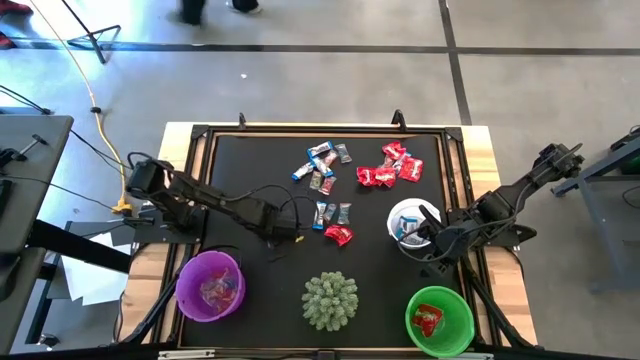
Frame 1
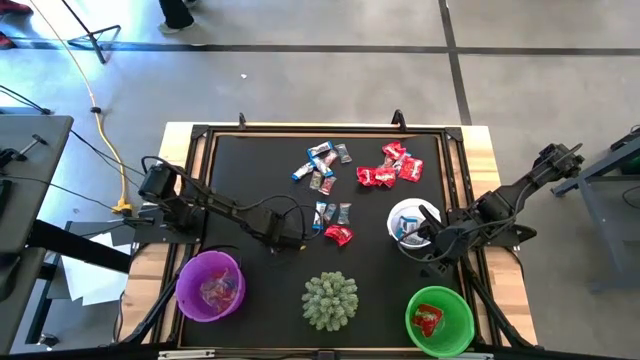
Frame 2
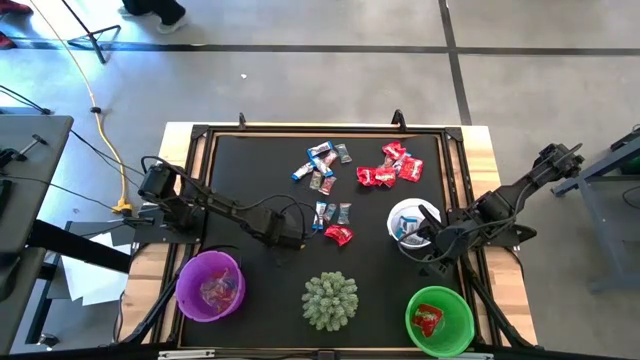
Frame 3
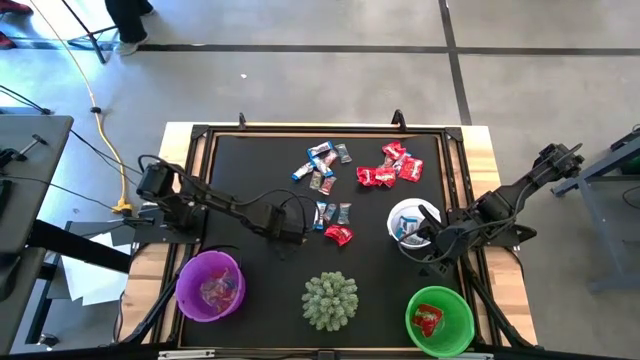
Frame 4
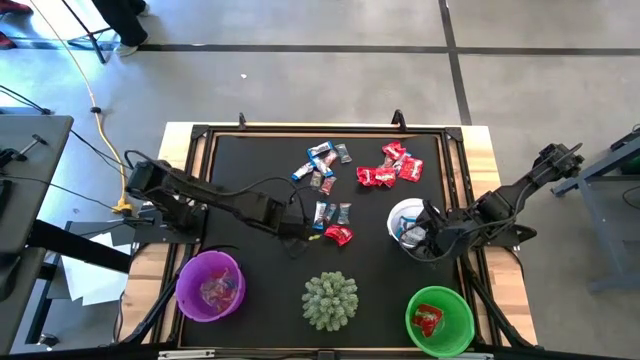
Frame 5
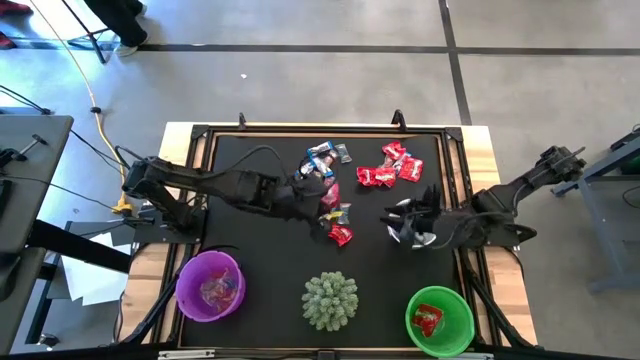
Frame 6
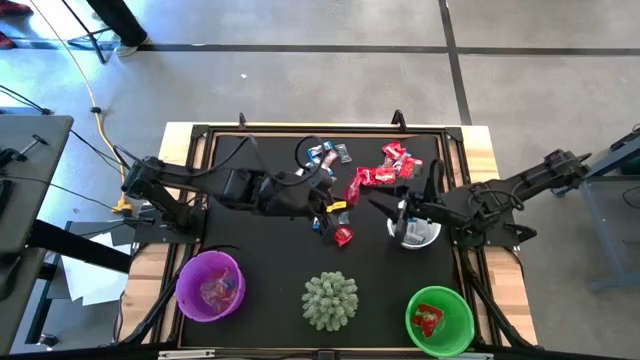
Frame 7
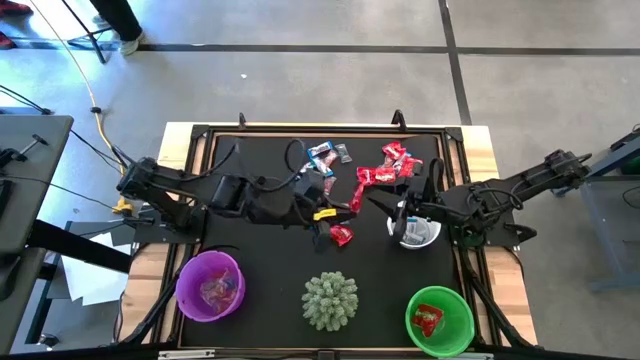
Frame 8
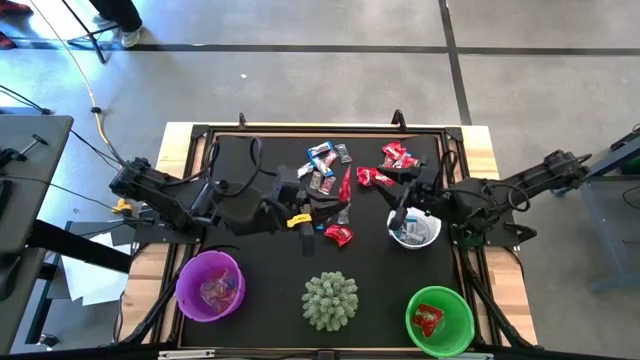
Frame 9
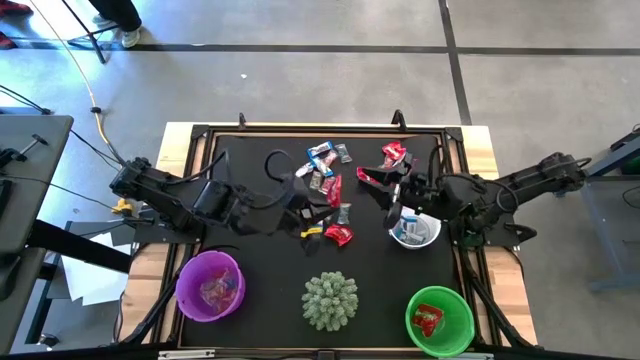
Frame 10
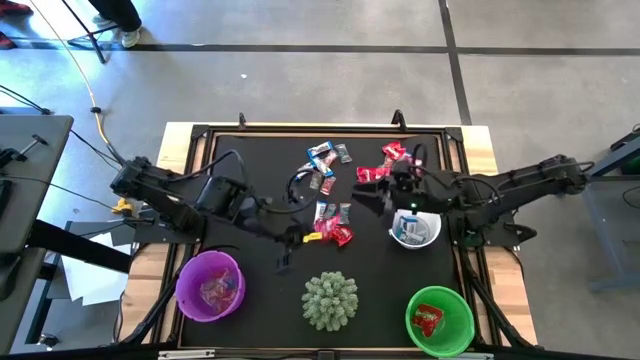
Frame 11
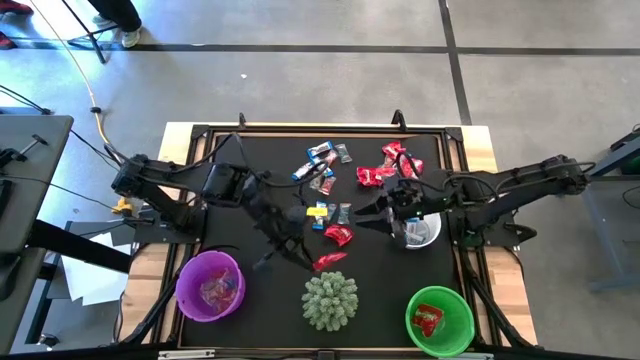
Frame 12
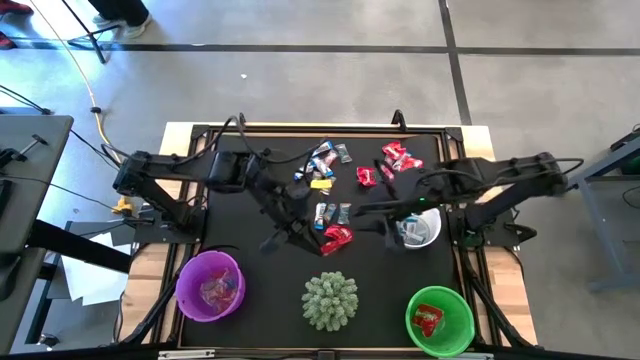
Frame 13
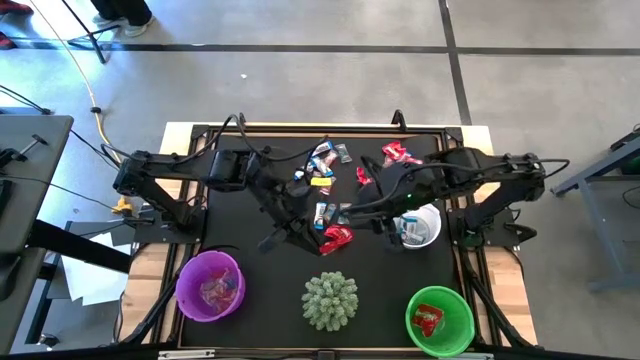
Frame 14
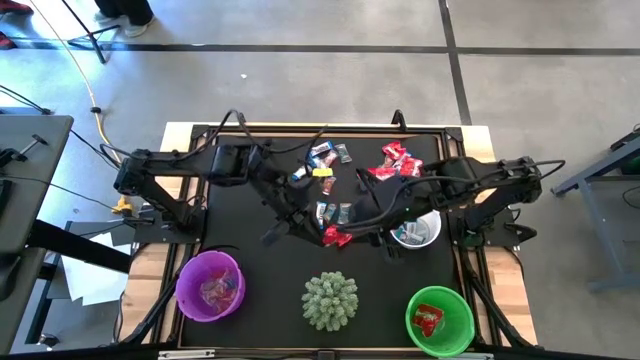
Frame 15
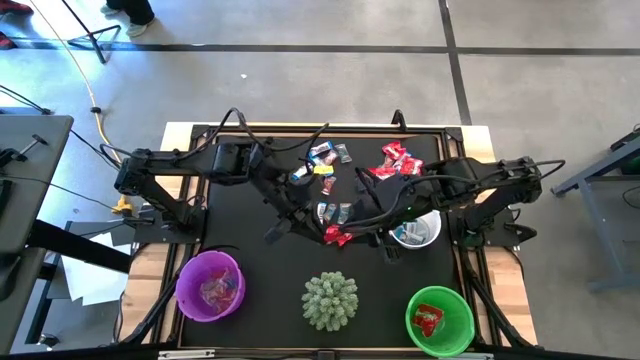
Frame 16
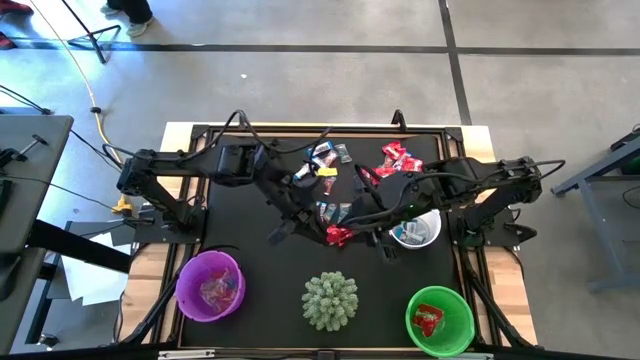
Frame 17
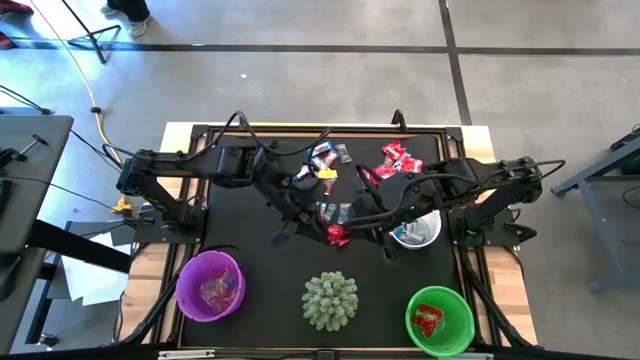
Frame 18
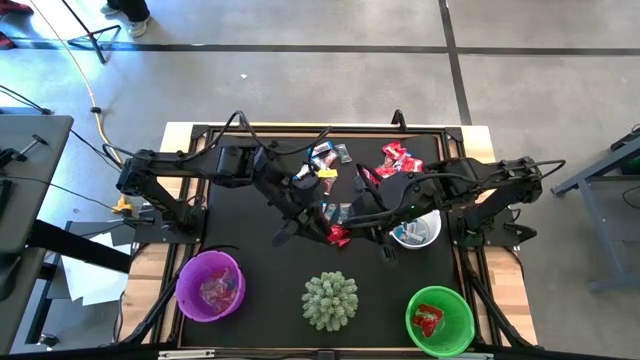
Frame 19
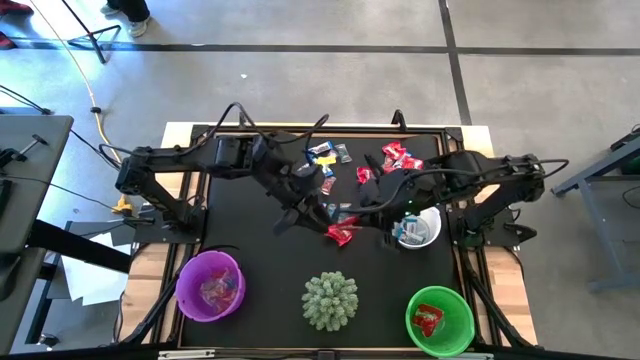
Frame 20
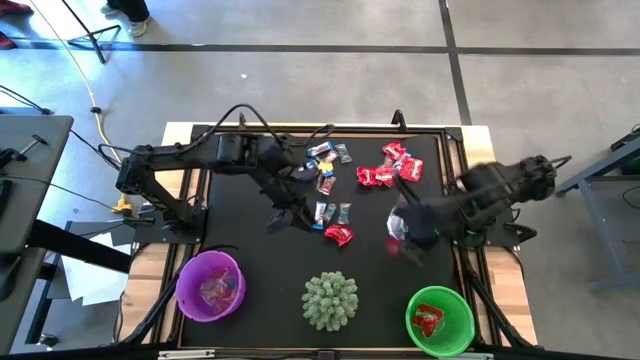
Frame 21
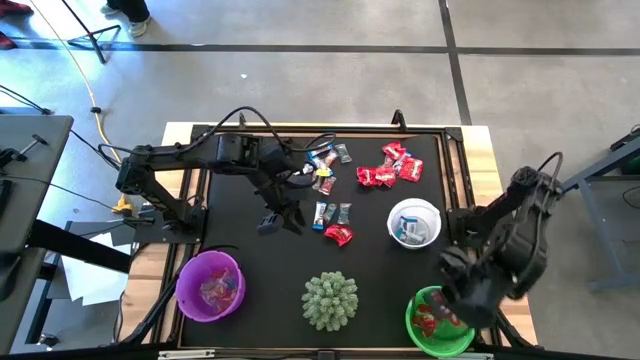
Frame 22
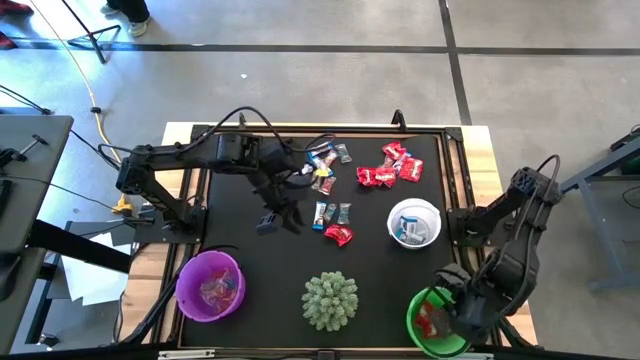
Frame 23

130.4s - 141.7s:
Task: Sort candy
Put the red candy wrapper into the green bin

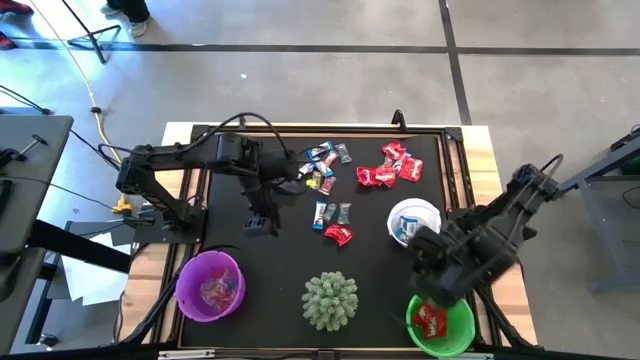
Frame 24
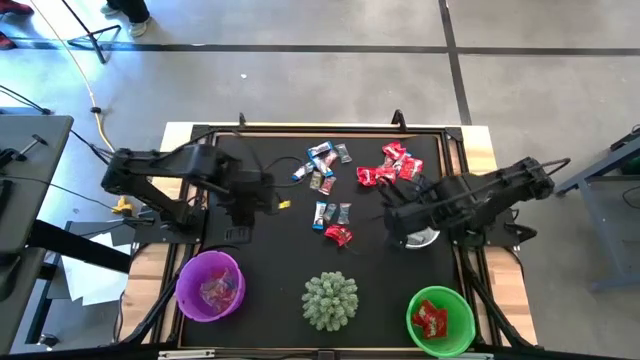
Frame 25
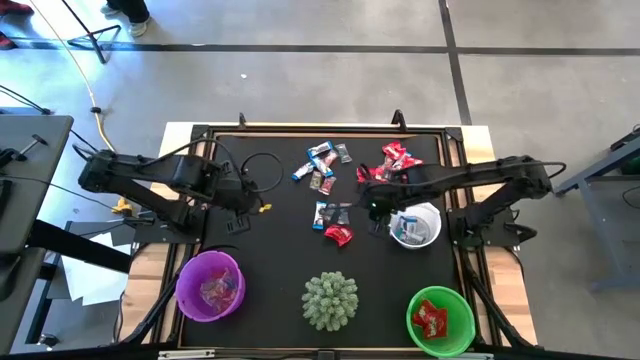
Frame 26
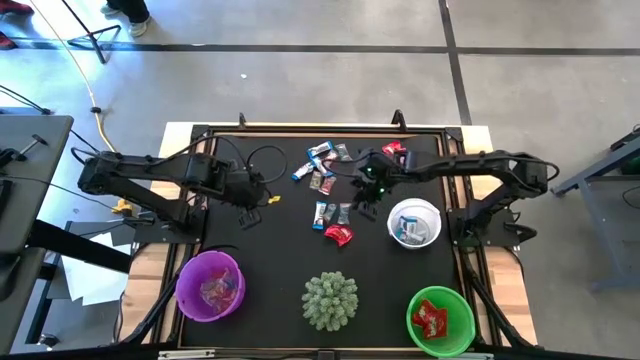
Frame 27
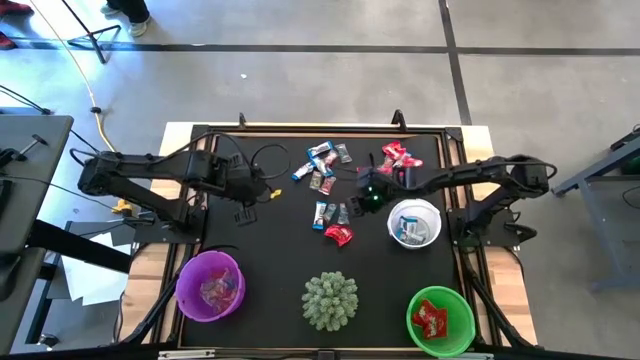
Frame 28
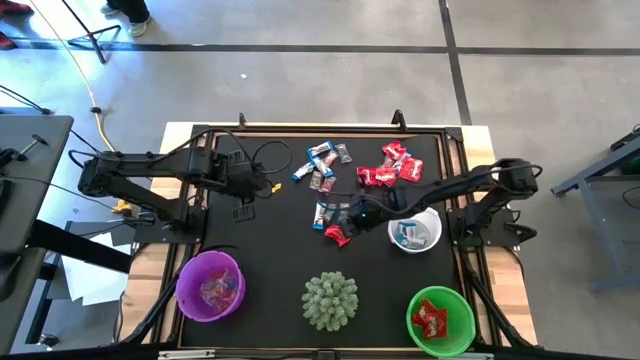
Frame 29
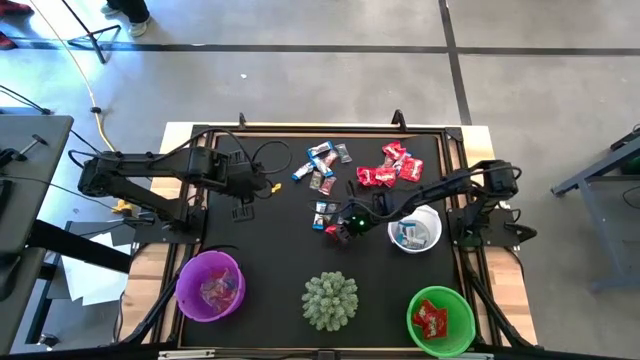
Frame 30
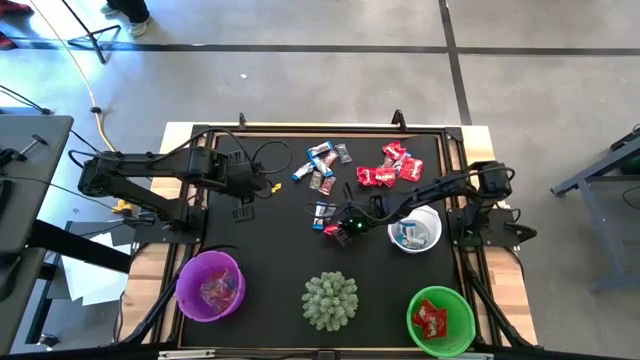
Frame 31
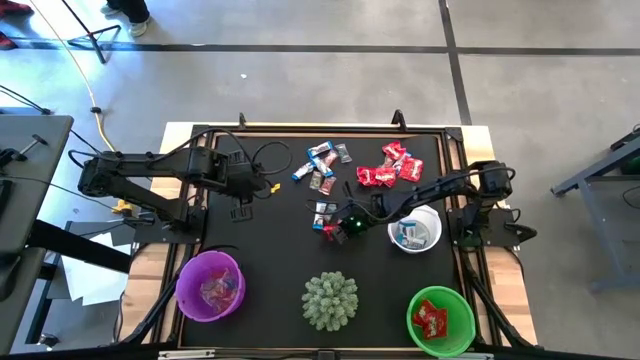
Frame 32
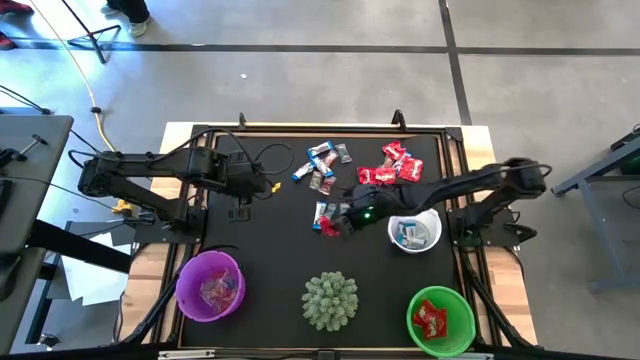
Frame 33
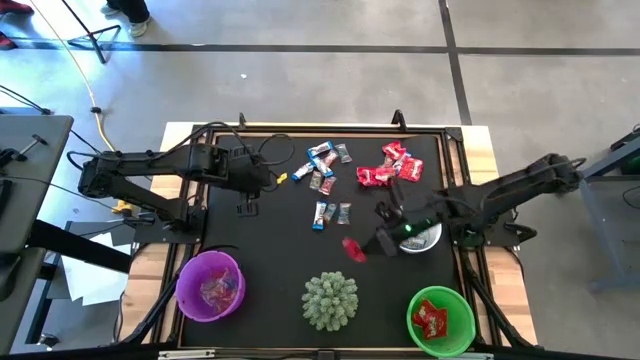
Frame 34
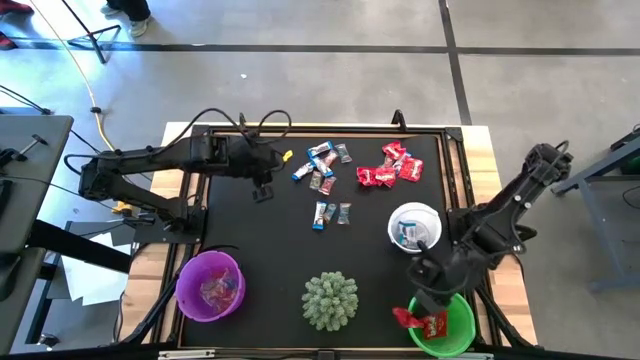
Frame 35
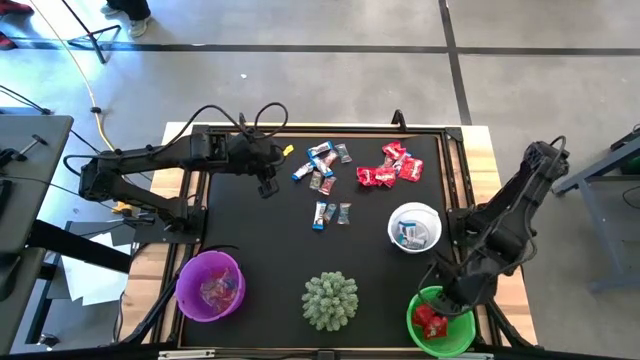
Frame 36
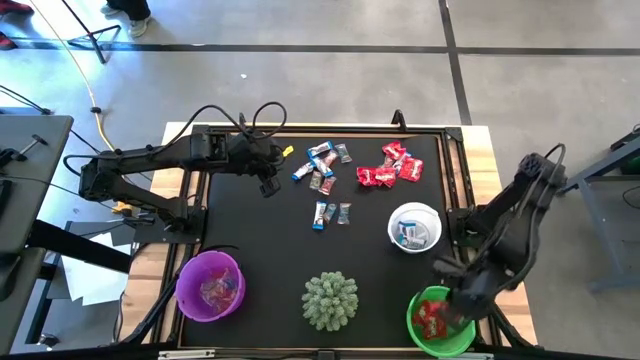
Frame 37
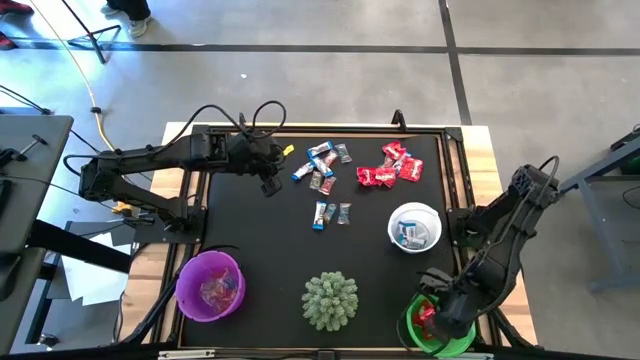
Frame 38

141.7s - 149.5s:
Put the red candy wrapper into the green bucket

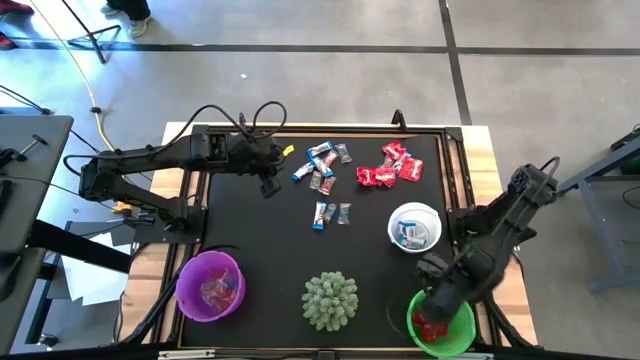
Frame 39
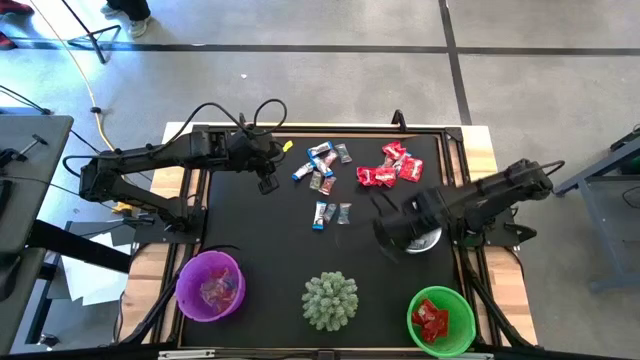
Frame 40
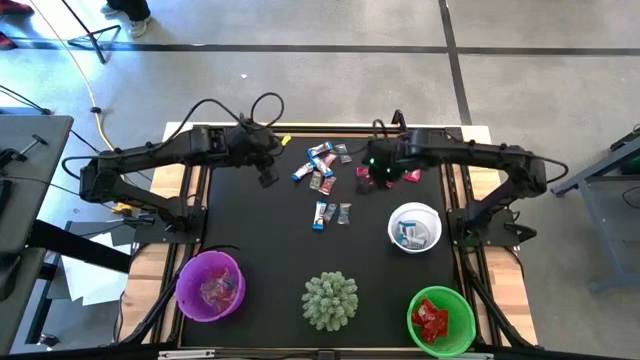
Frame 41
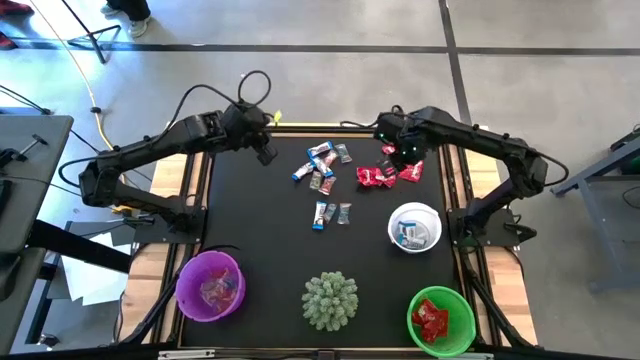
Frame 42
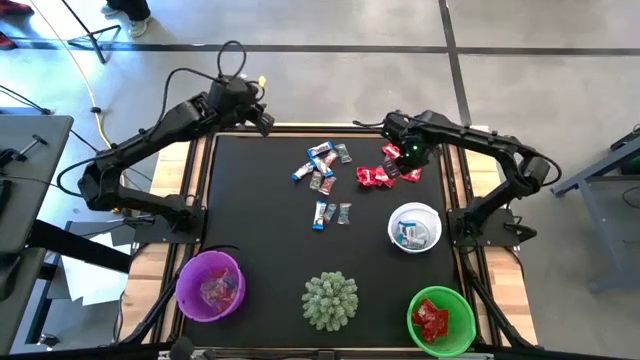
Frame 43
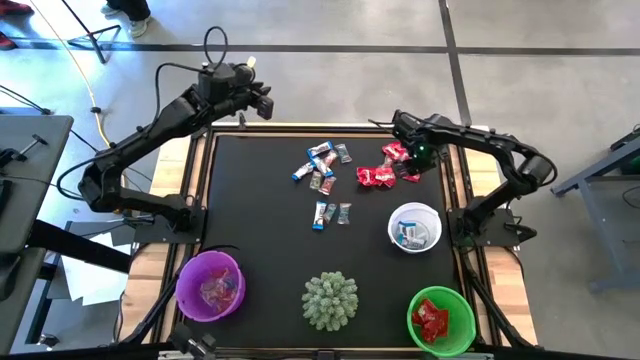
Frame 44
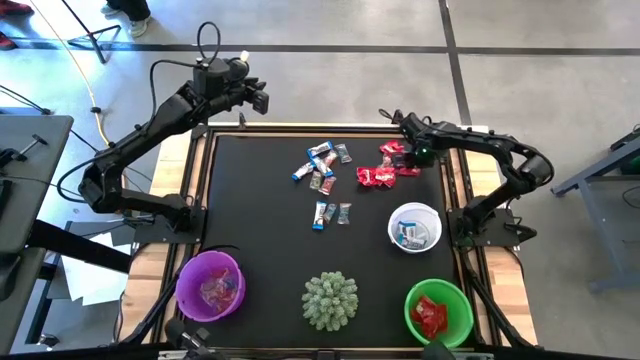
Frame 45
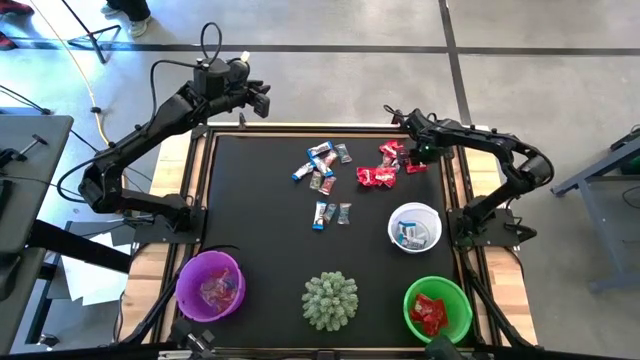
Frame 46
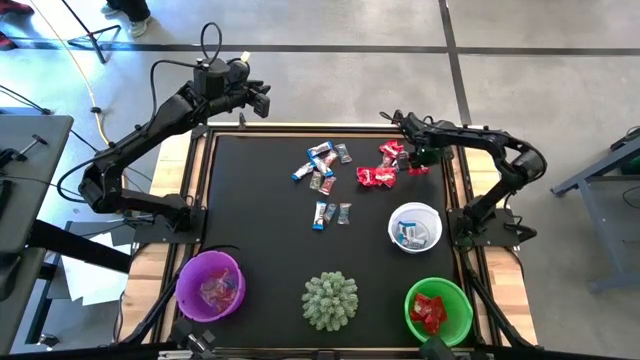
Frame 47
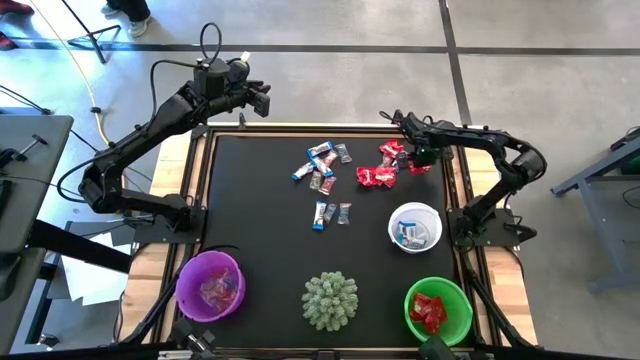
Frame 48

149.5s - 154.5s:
Put the red candy wrapper into the green bucket
